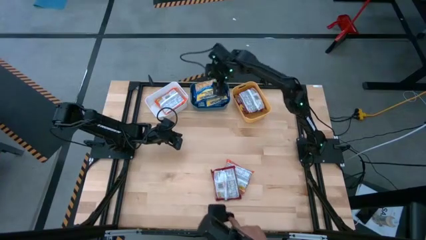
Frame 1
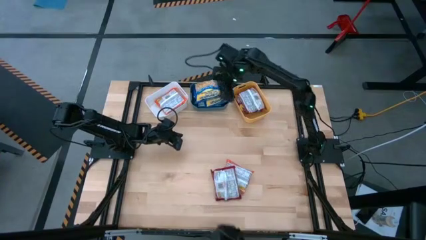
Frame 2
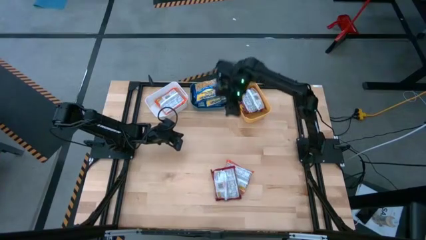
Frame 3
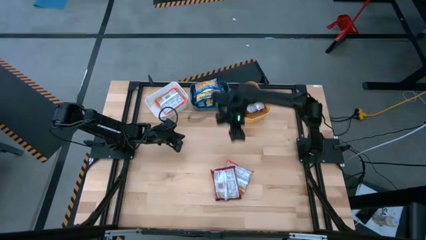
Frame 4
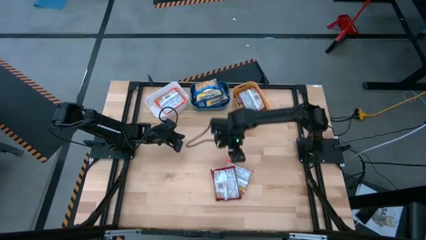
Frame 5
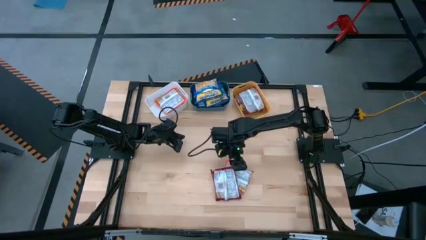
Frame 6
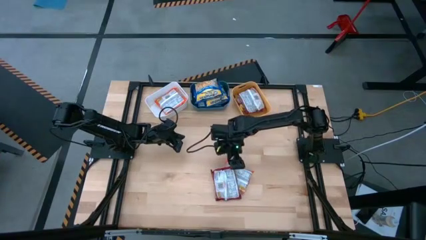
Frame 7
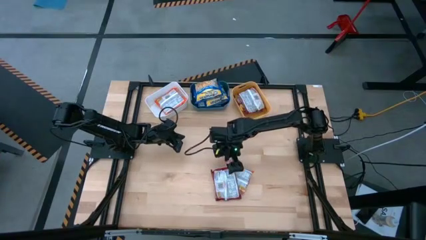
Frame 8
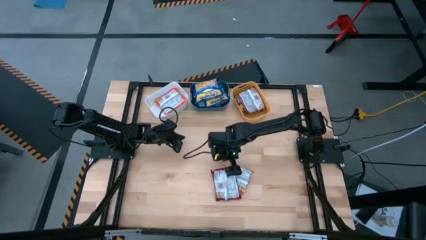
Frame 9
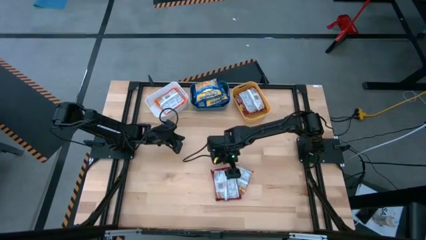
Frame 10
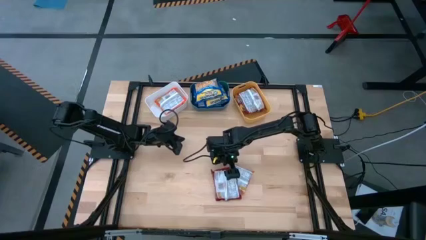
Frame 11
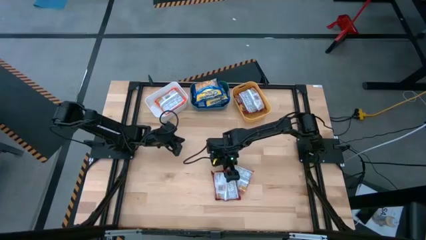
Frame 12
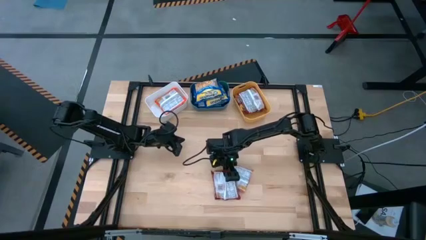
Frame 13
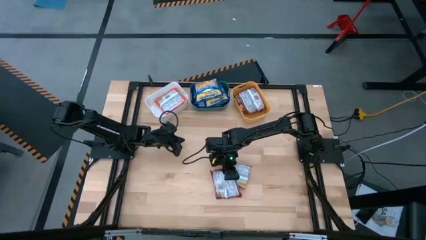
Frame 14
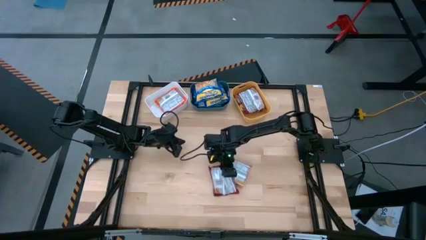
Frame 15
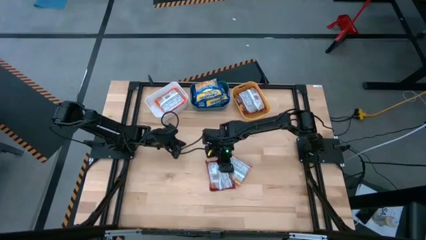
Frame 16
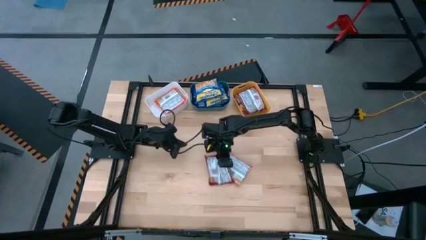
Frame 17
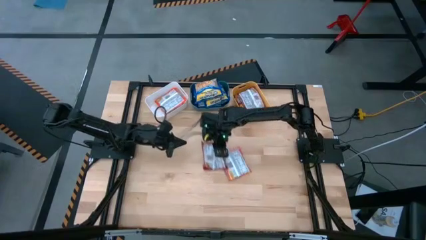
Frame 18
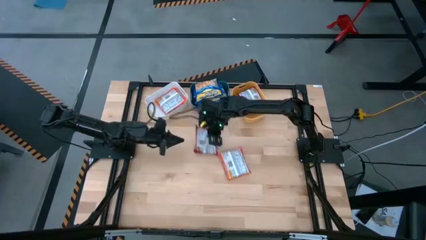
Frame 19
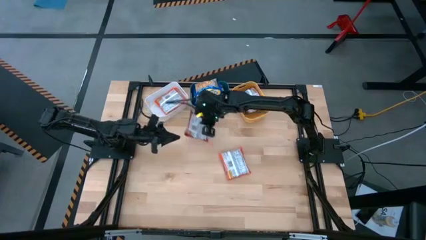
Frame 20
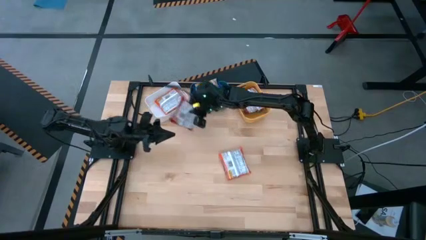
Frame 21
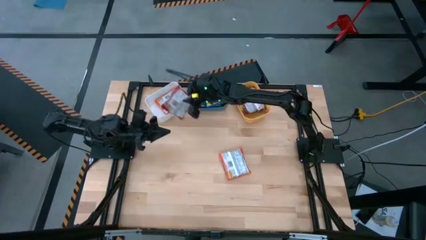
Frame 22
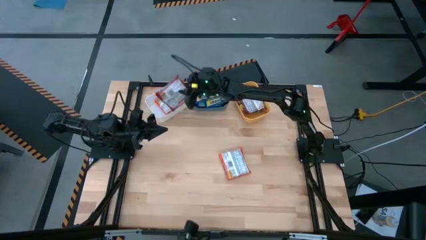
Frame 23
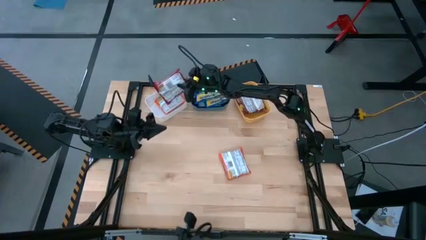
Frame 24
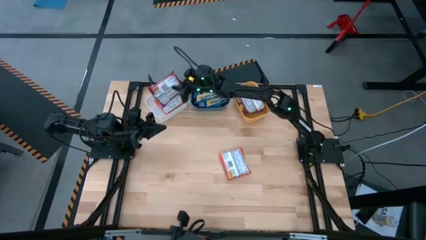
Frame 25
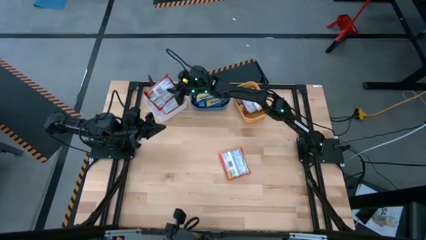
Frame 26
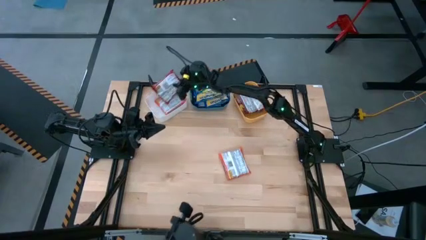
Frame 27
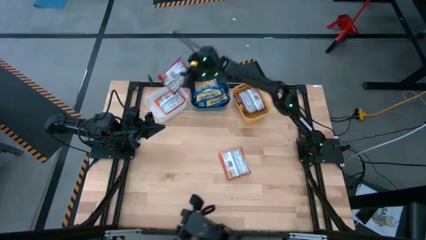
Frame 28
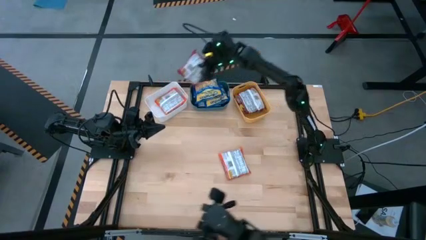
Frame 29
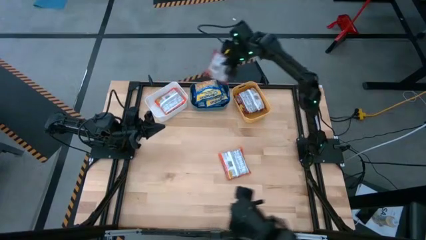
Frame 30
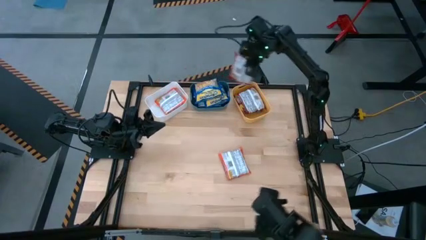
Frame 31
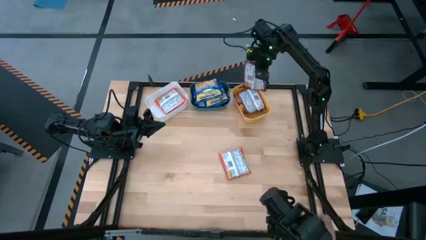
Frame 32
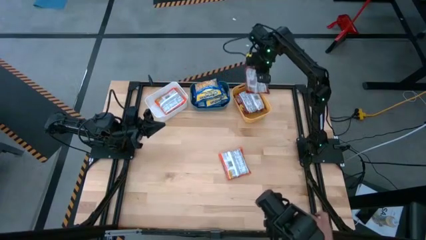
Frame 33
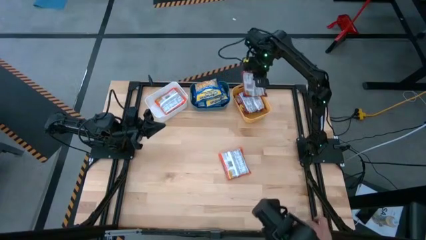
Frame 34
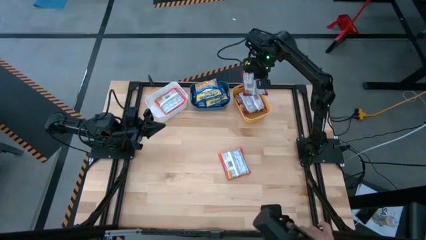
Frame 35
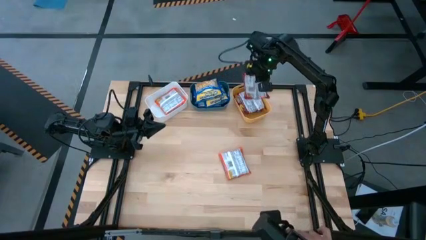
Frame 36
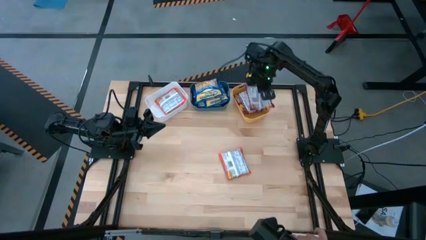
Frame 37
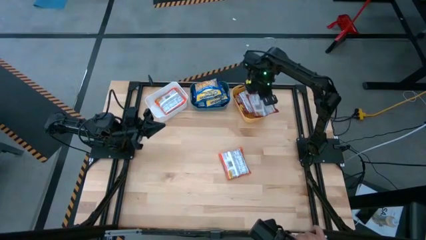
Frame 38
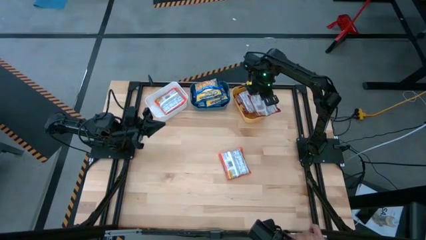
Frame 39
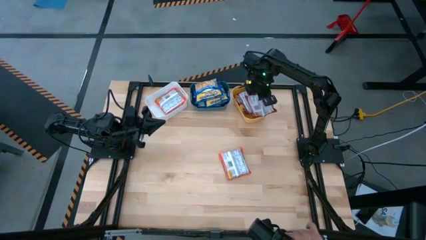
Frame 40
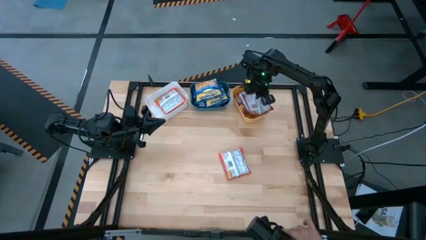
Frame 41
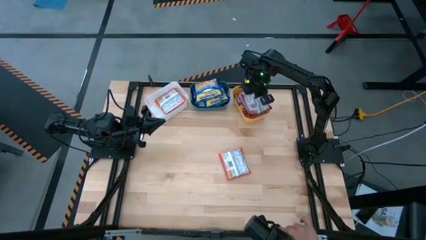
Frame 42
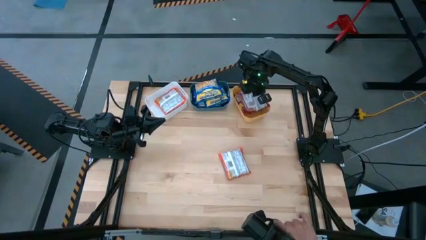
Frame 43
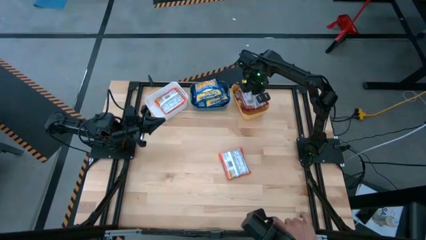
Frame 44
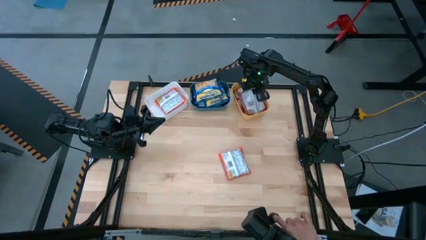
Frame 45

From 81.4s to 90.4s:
Task: Sort Maruchan noodles
Put the red noodle pack into the yellow bin

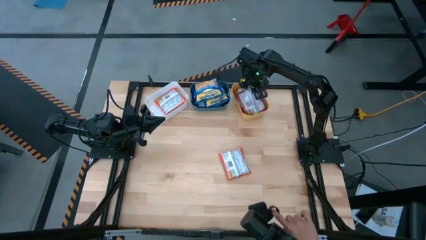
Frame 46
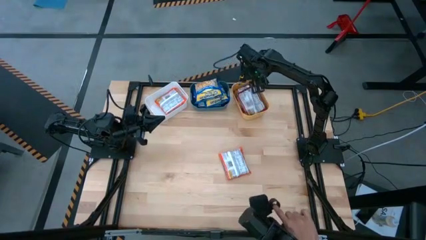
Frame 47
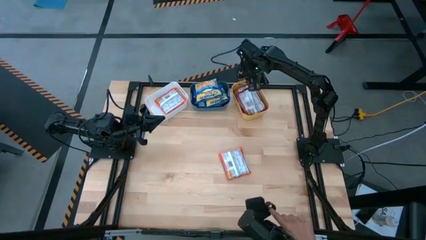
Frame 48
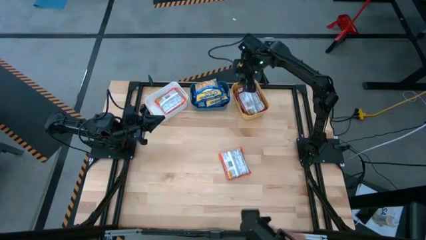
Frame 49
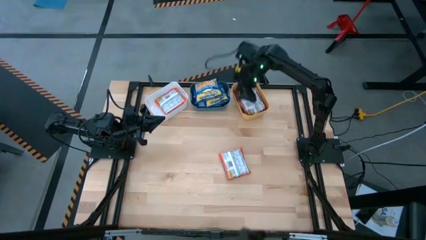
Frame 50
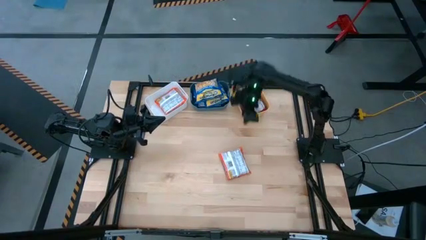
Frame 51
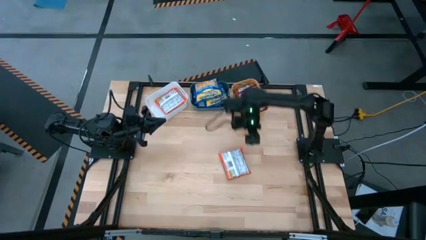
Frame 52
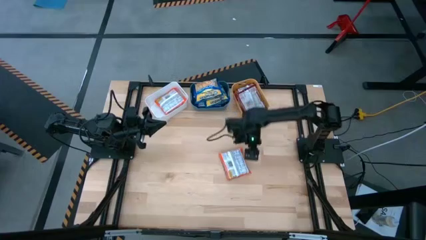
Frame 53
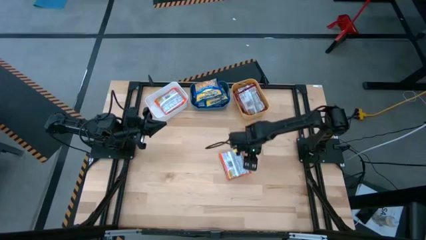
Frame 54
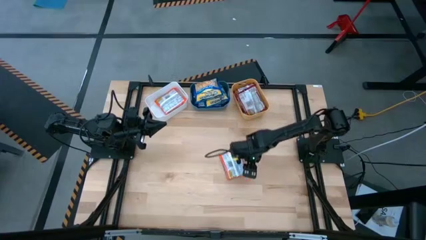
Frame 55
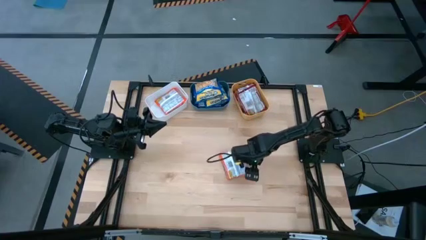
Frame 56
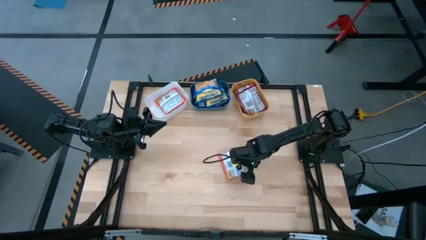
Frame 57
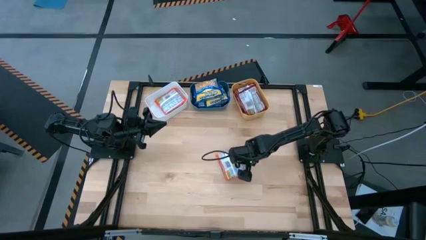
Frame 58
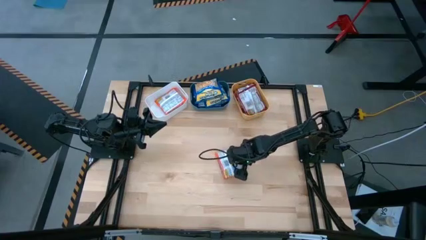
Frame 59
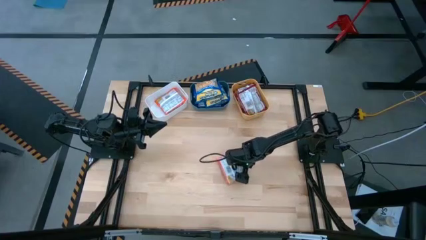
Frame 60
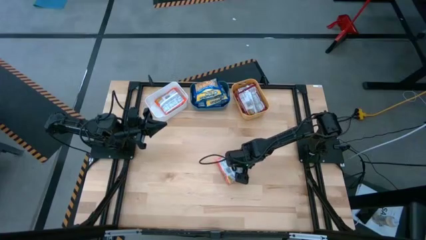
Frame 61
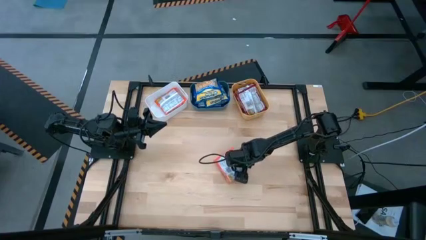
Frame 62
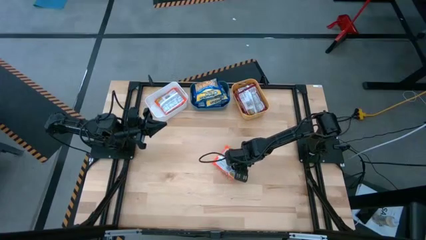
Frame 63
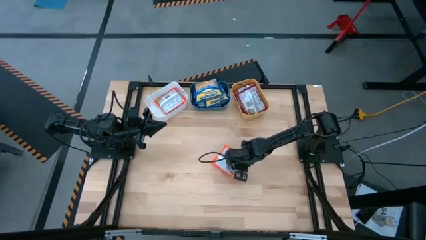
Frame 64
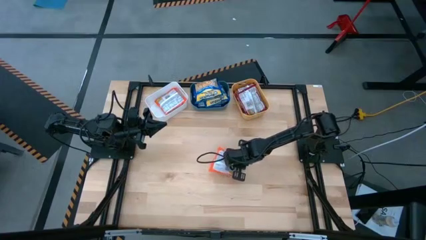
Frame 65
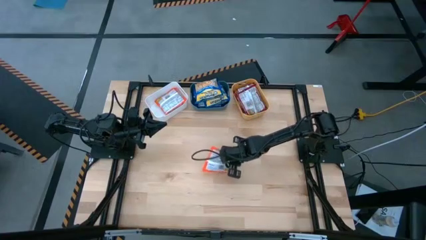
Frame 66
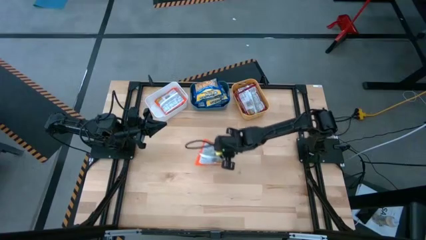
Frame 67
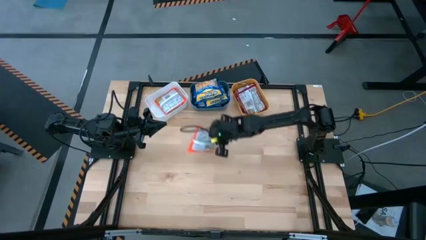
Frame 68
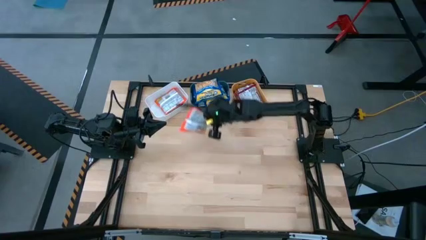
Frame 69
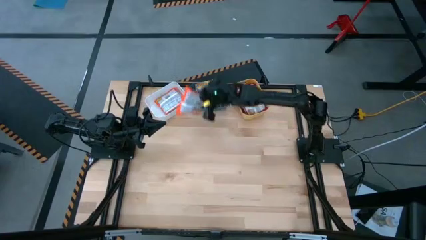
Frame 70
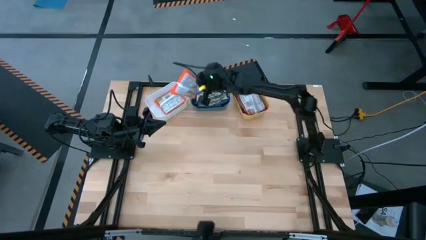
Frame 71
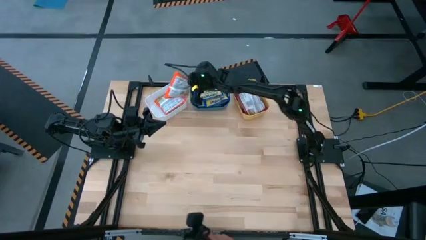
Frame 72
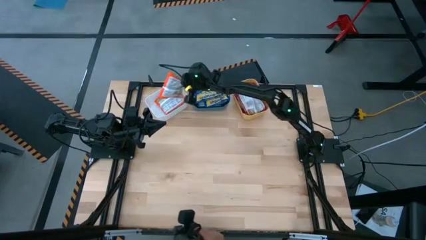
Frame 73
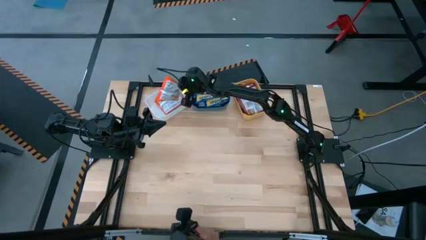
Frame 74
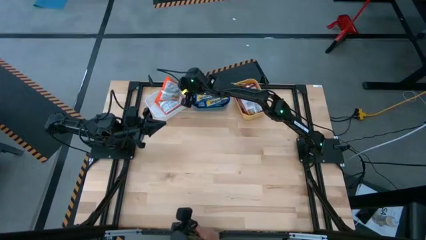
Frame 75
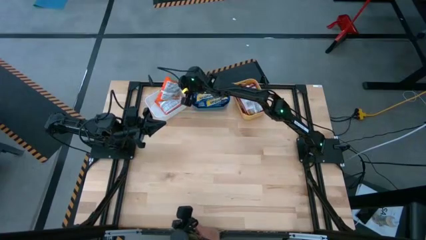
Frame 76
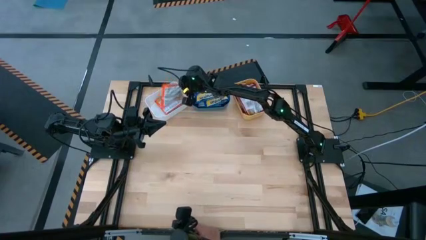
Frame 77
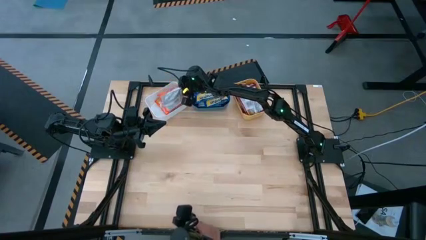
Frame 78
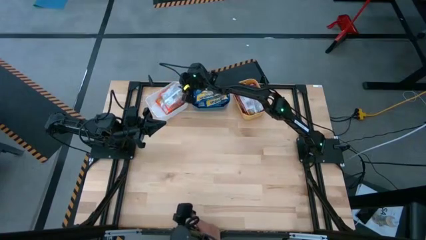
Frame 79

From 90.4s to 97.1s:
Put the orange noodle pack into the white bin
